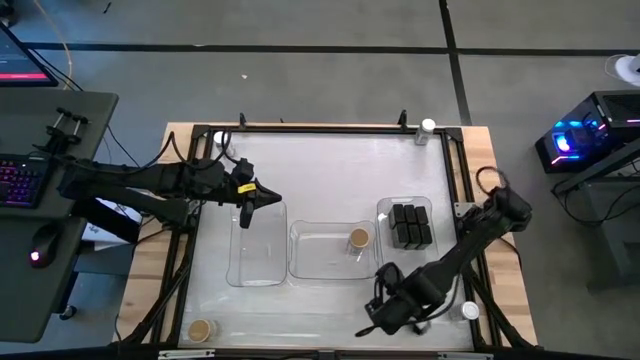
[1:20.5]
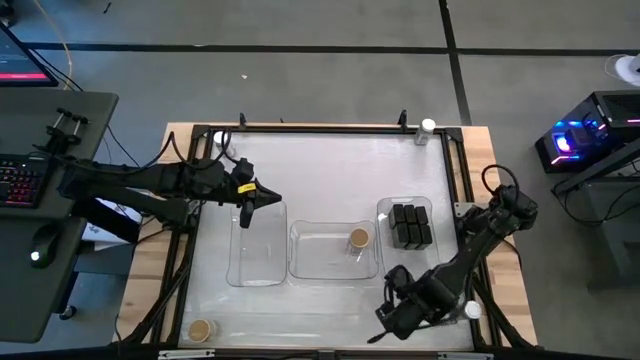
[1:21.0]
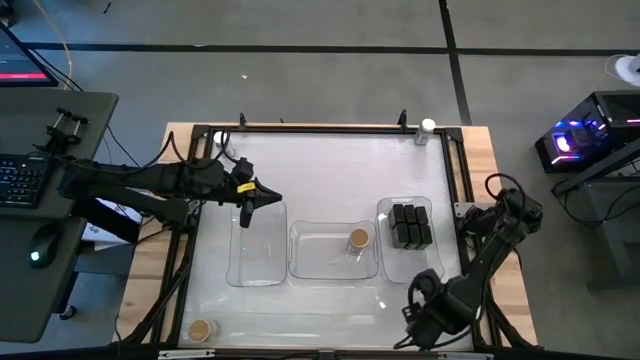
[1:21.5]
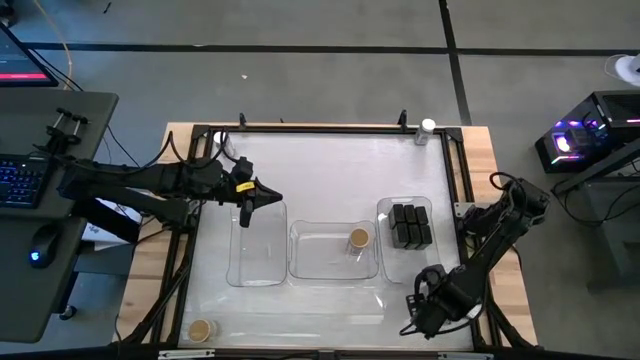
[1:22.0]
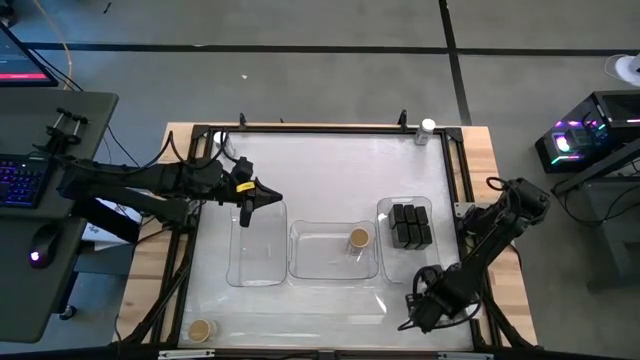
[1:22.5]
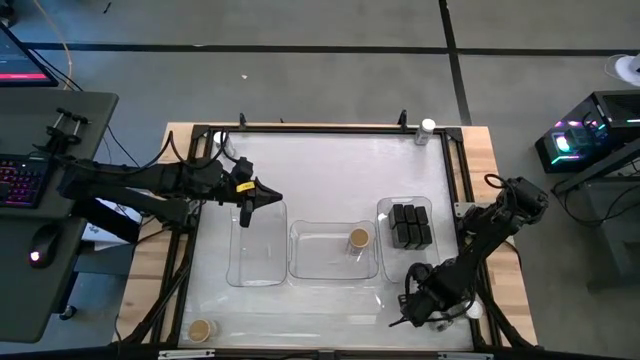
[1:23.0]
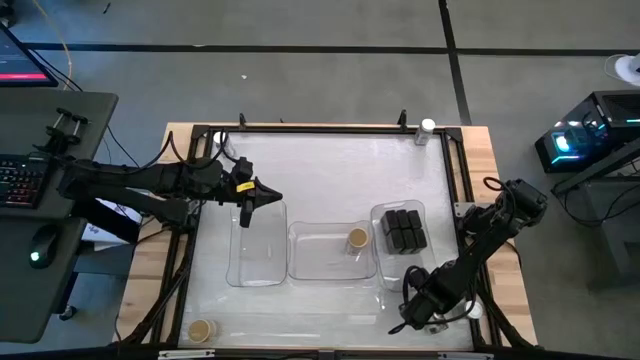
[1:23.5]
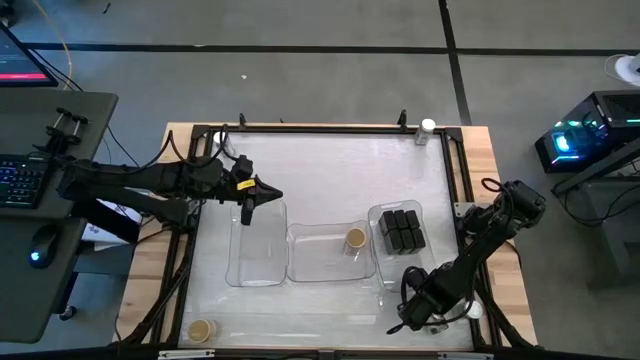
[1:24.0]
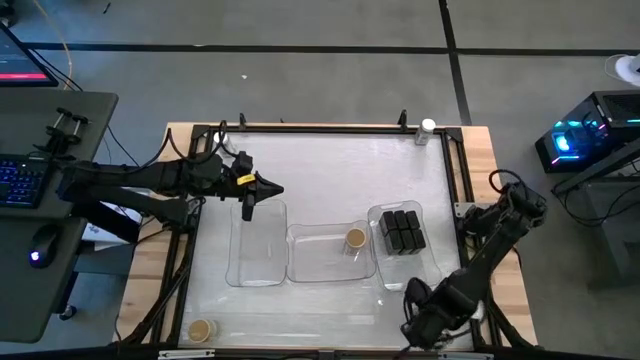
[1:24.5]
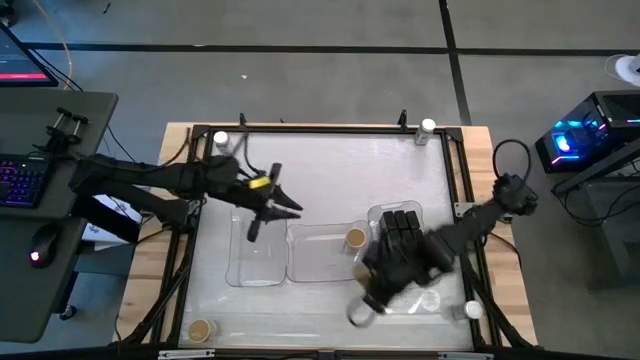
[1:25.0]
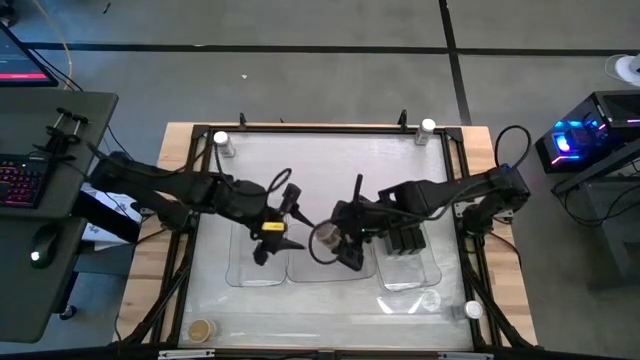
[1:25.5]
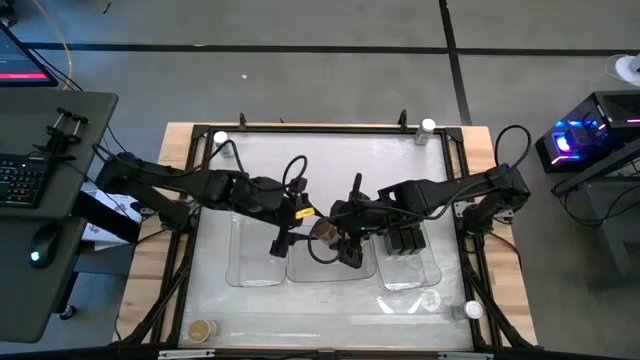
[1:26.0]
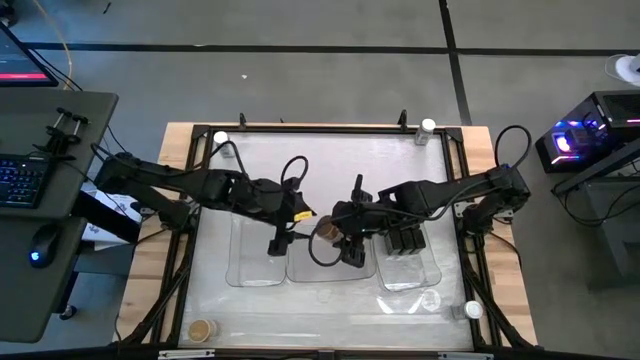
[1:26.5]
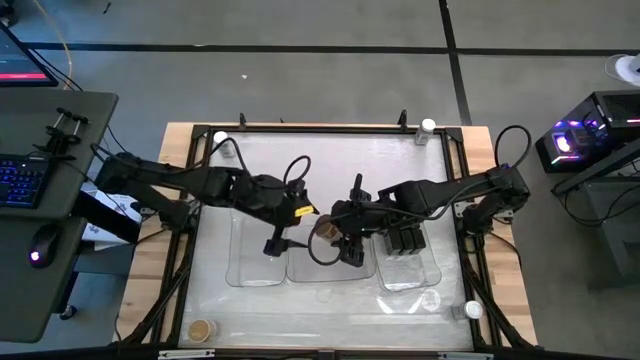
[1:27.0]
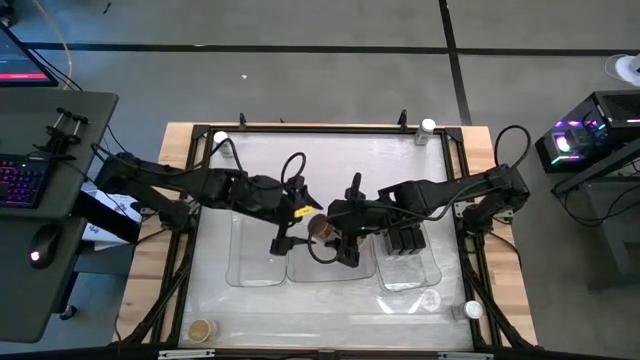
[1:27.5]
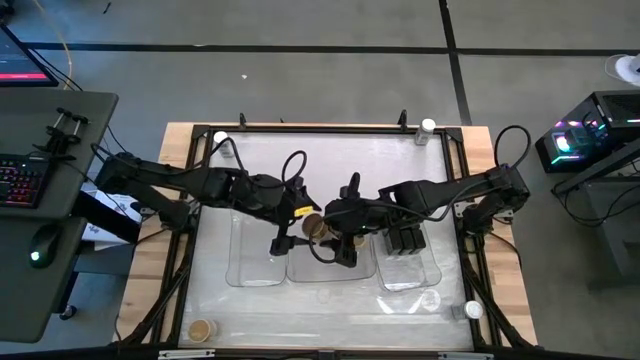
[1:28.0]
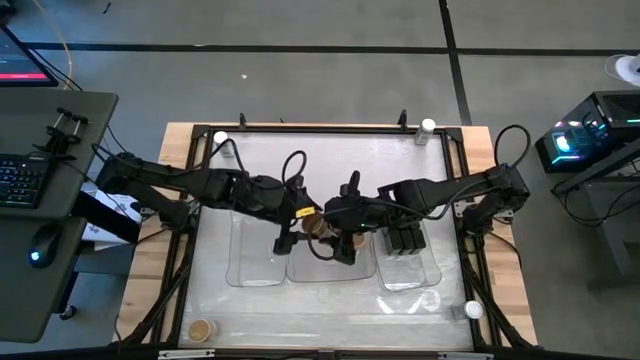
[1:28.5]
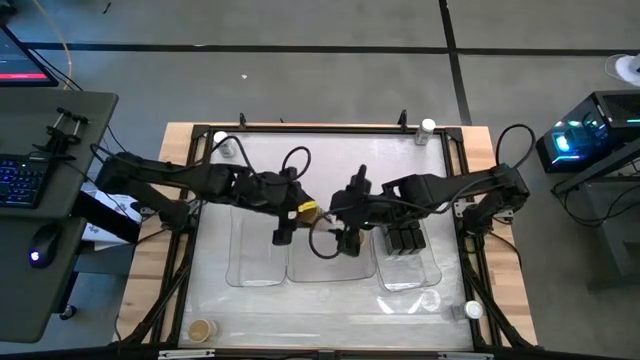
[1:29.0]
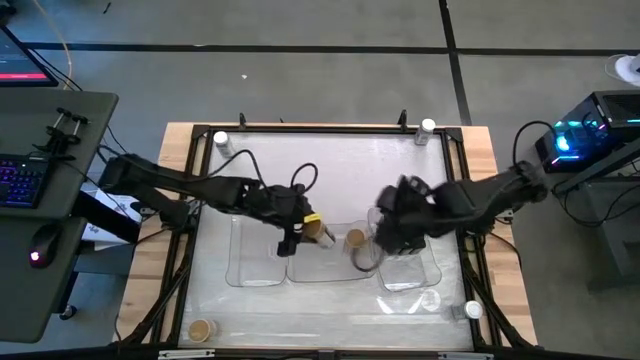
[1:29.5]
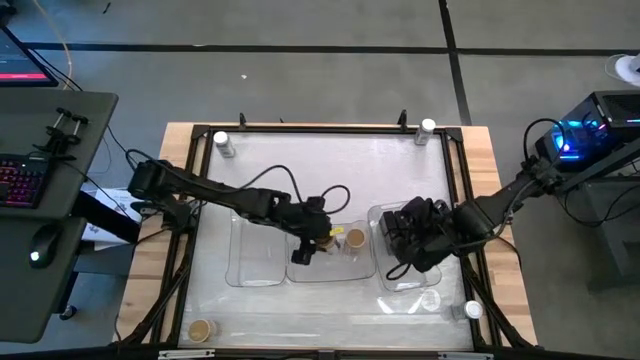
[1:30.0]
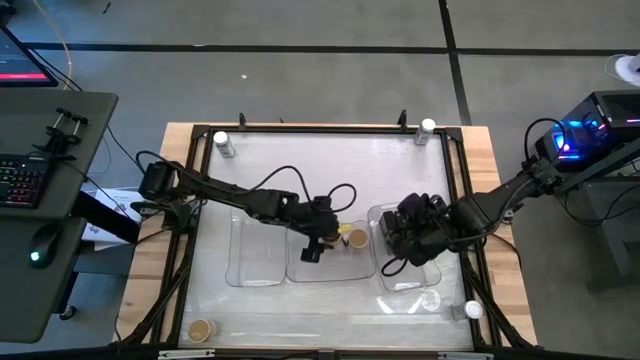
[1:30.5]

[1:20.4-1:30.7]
Task: Sort spices by type
Put the golden seasoning bottle into the middle transparent bin aligned with the other golden seasoning bottle

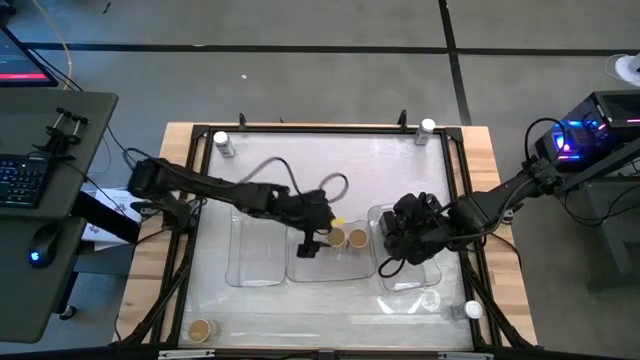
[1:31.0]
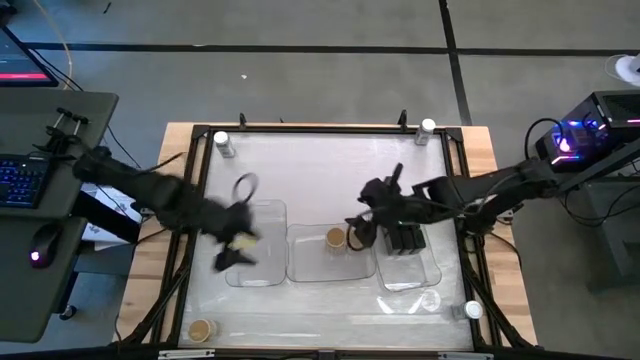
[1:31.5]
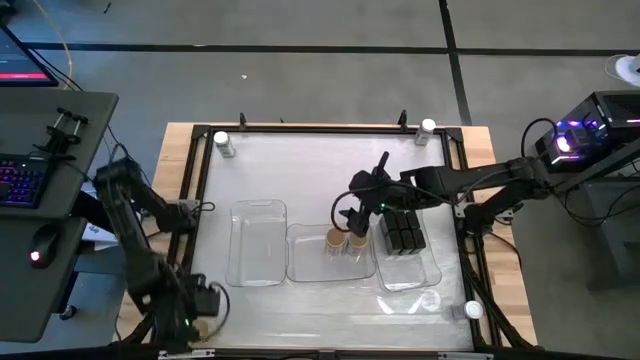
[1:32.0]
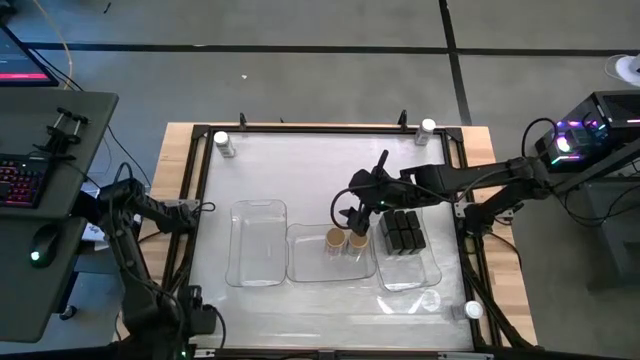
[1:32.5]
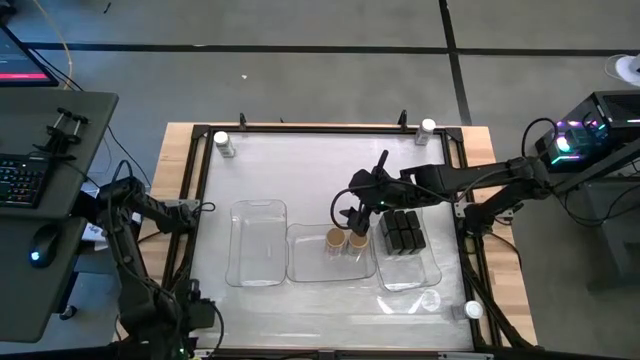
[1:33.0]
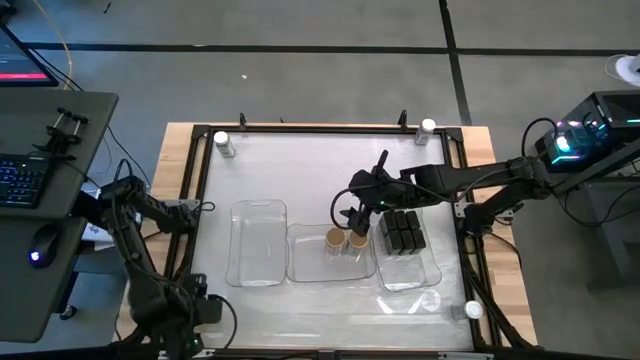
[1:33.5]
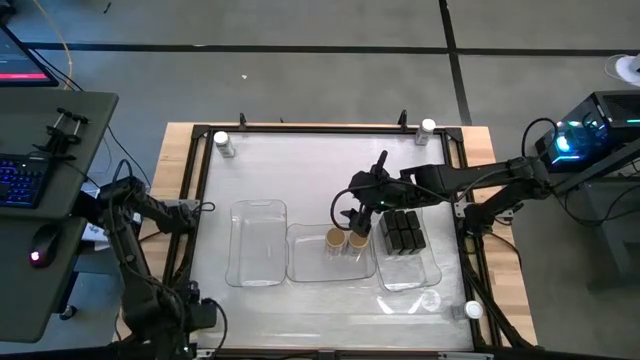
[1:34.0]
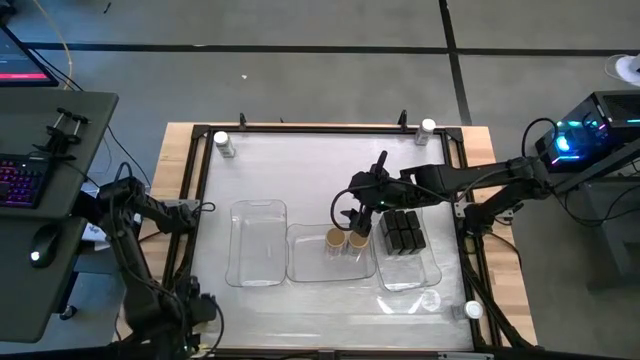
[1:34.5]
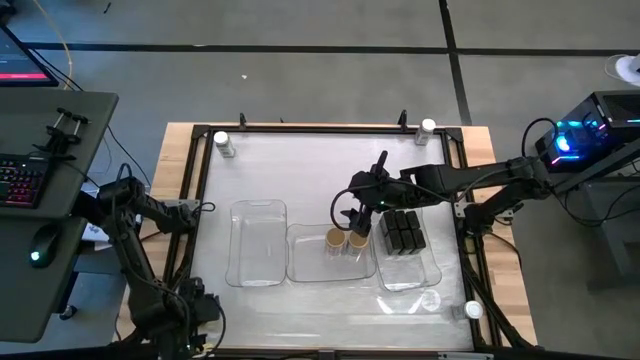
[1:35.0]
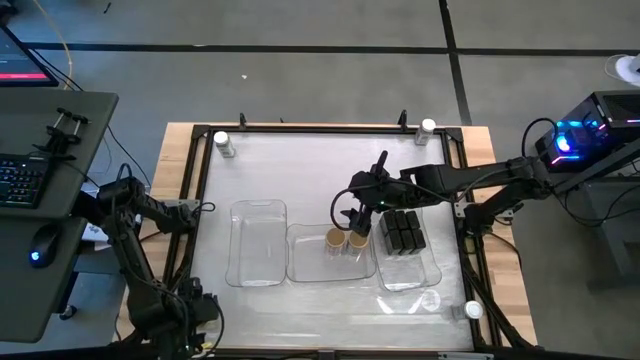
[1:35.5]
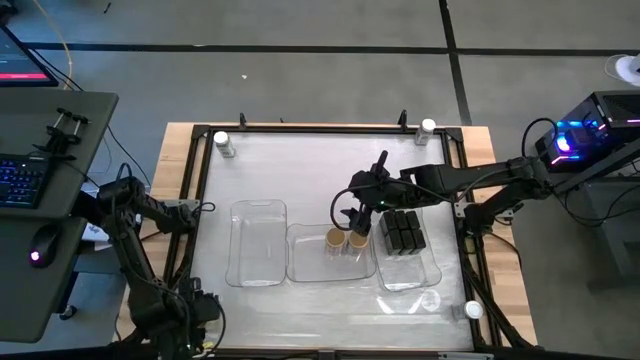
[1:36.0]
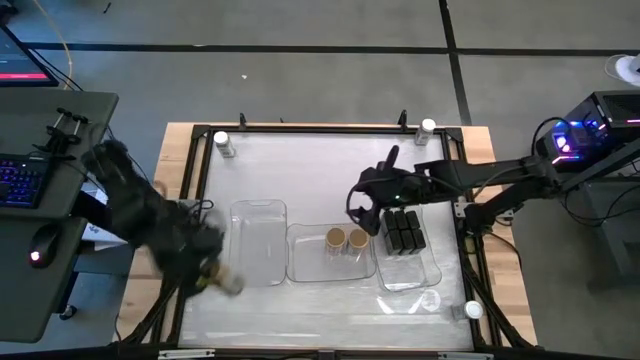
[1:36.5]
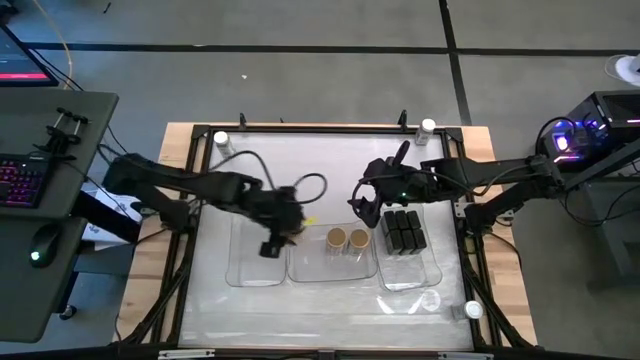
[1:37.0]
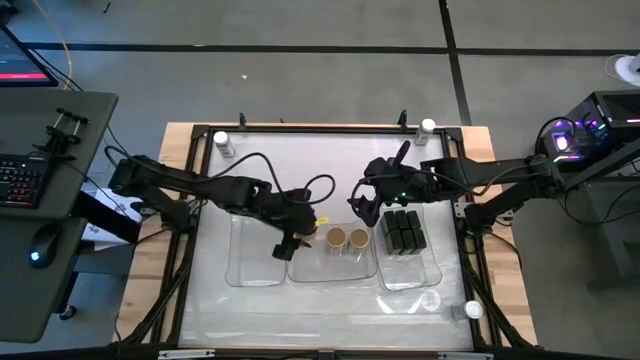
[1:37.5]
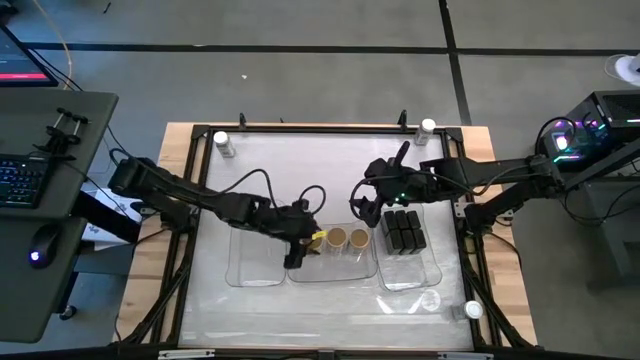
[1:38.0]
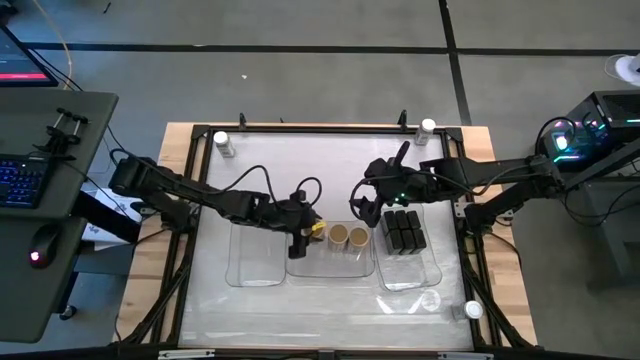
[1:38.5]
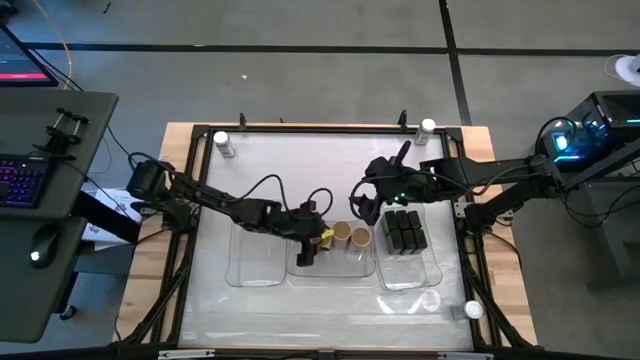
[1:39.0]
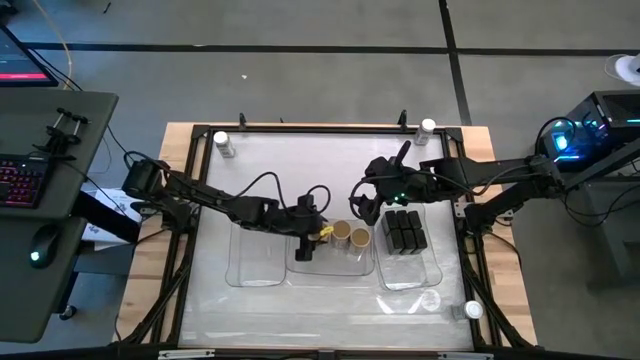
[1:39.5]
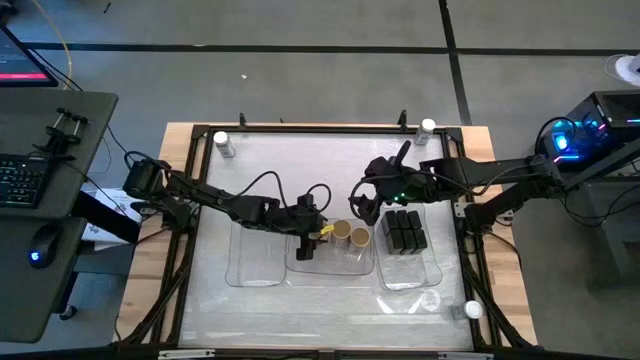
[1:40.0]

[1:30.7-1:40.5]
Put the golden seasoning bottle into the middle transparent bin aligned with the other golden seasoning bottles

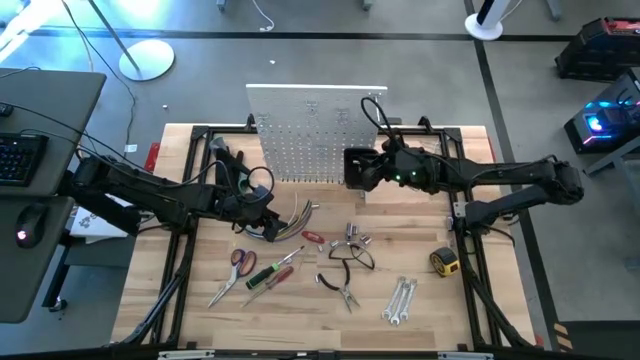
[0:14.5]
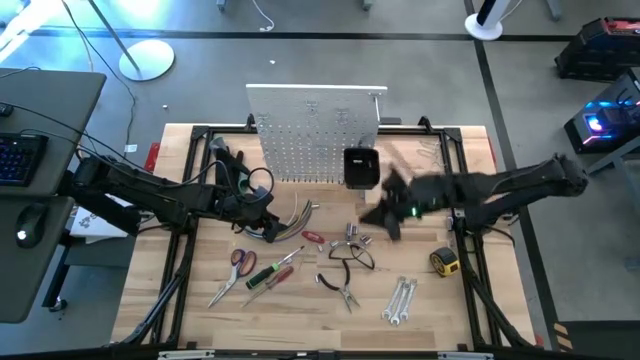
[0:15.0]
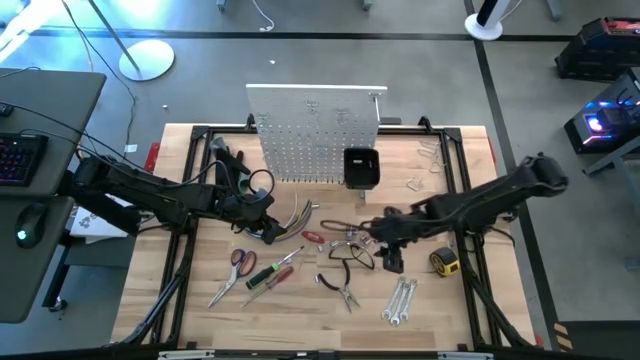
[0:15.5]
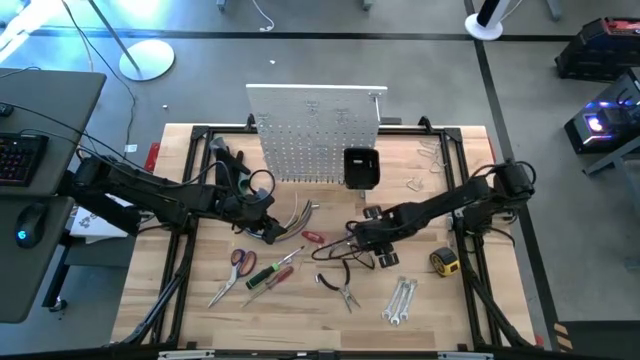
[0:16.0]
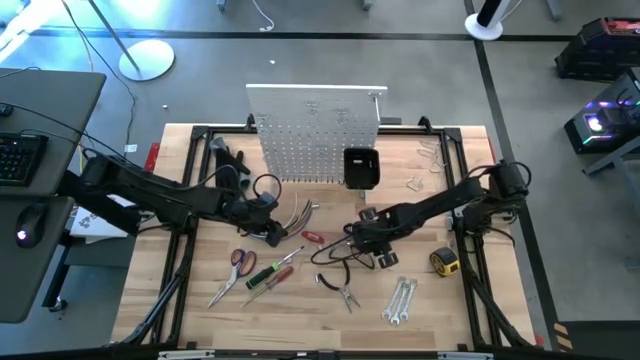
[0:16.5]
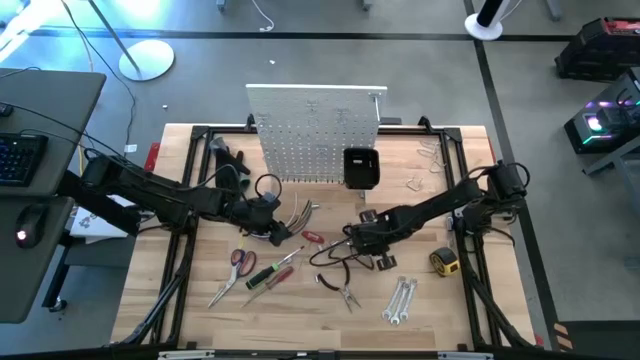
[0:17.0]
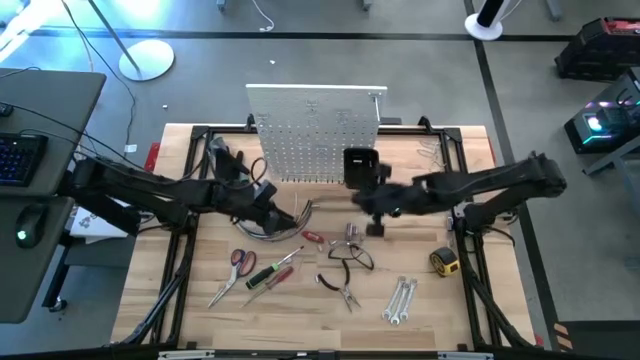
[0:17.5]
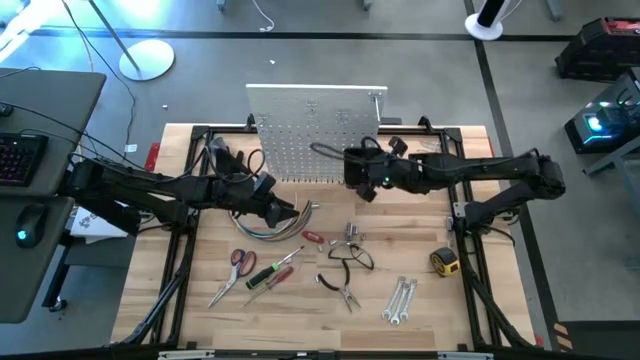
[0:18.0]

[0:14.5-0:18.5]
Task: Hang tools onto peg board
Put the socket into the black bin on the peg board
